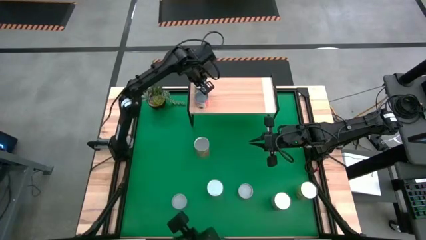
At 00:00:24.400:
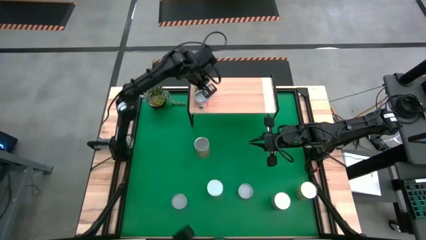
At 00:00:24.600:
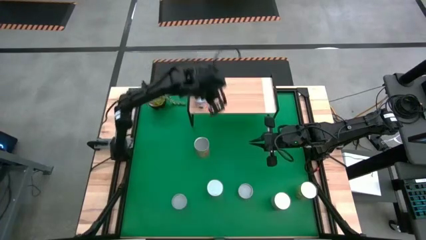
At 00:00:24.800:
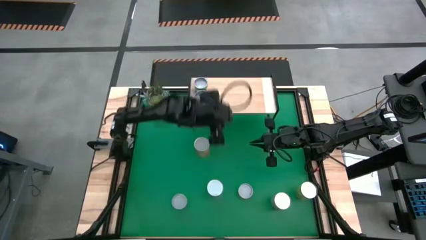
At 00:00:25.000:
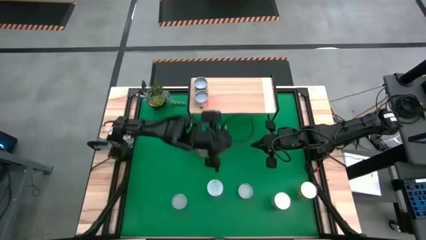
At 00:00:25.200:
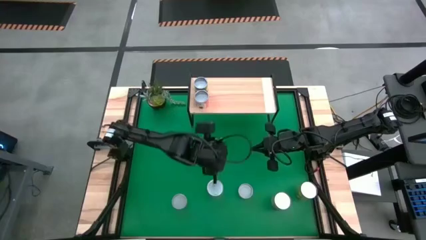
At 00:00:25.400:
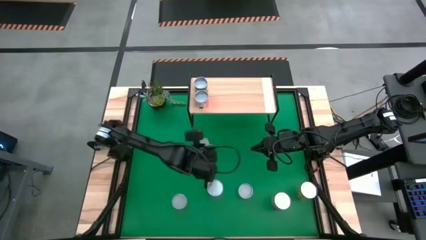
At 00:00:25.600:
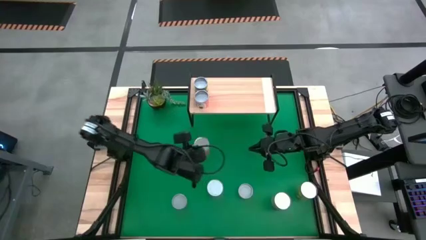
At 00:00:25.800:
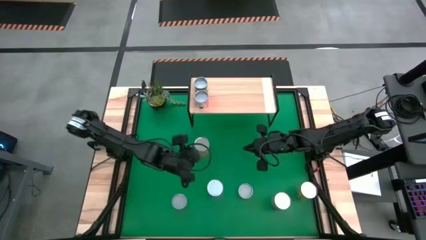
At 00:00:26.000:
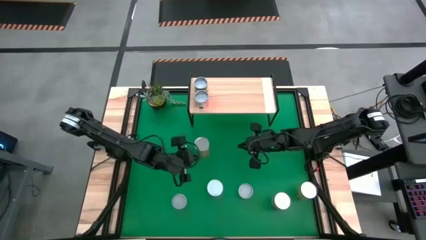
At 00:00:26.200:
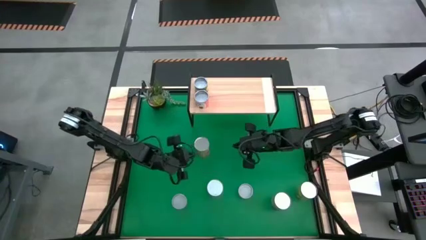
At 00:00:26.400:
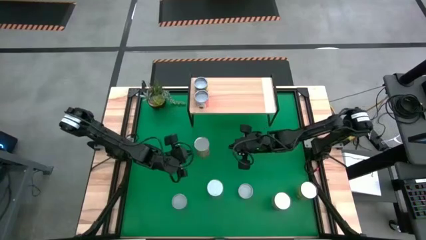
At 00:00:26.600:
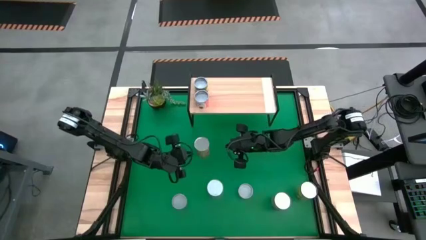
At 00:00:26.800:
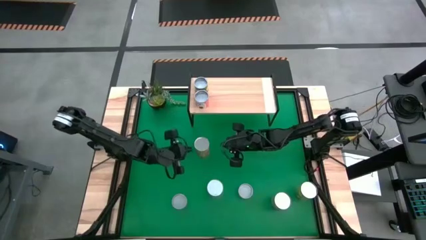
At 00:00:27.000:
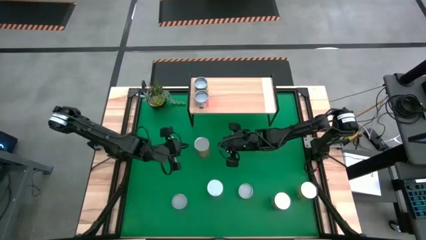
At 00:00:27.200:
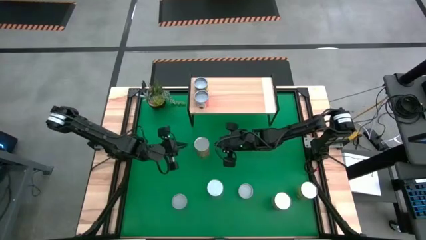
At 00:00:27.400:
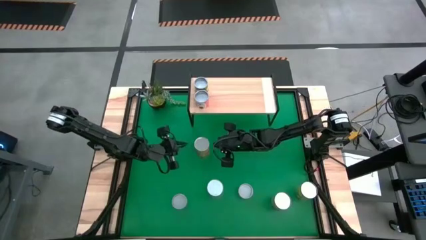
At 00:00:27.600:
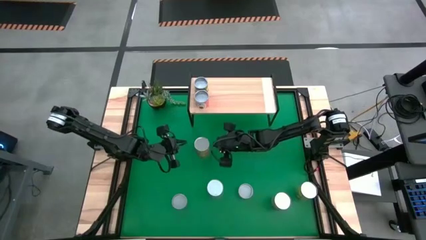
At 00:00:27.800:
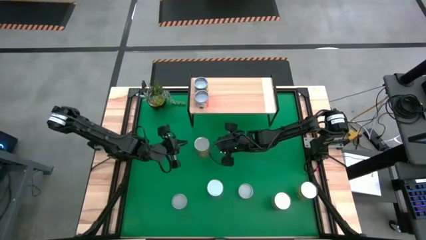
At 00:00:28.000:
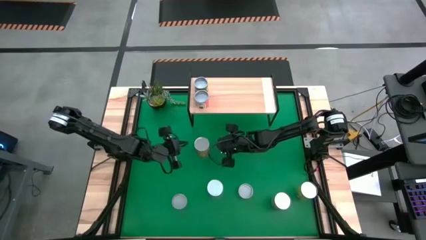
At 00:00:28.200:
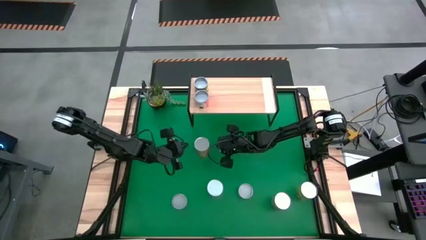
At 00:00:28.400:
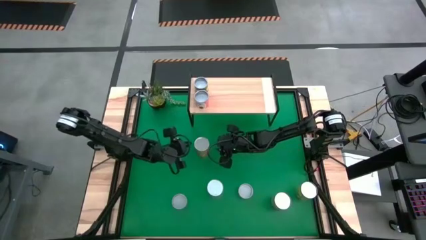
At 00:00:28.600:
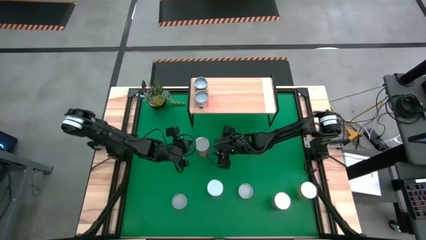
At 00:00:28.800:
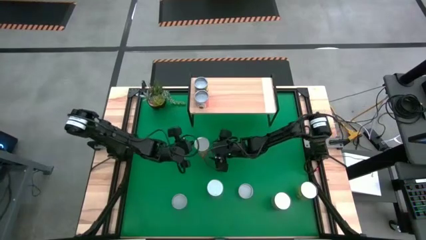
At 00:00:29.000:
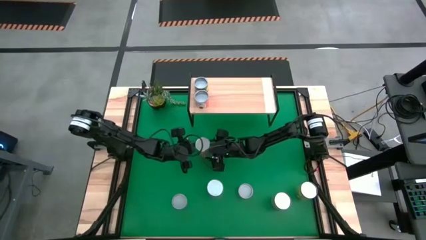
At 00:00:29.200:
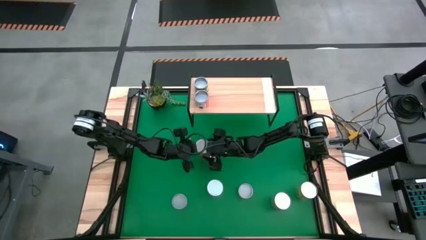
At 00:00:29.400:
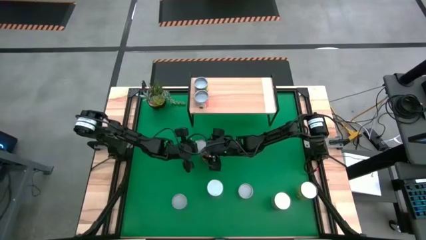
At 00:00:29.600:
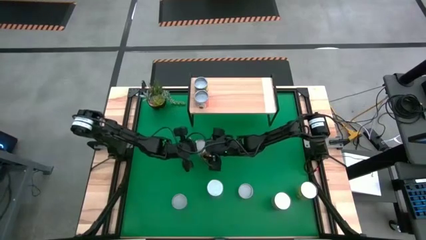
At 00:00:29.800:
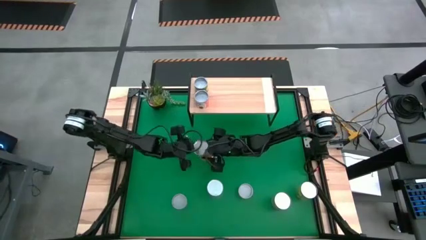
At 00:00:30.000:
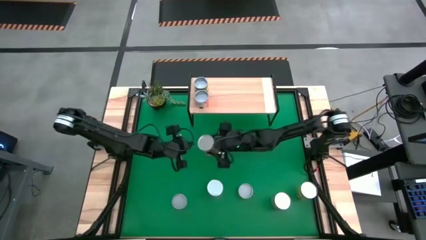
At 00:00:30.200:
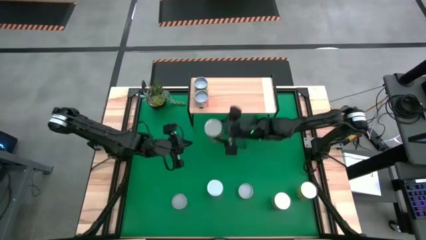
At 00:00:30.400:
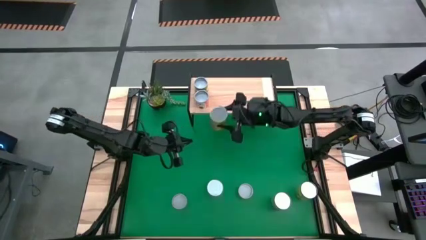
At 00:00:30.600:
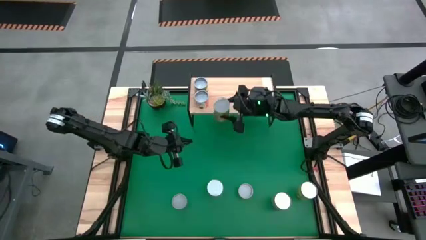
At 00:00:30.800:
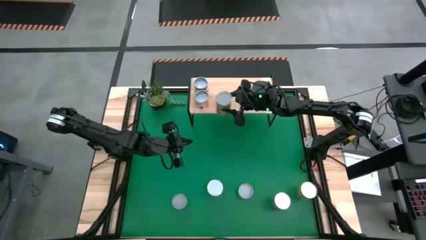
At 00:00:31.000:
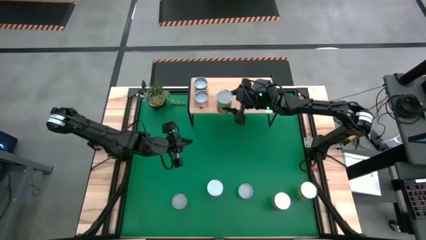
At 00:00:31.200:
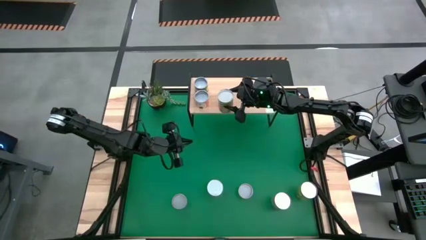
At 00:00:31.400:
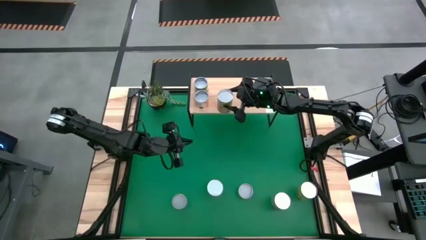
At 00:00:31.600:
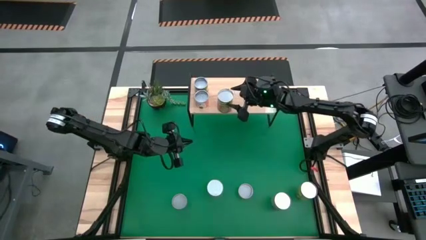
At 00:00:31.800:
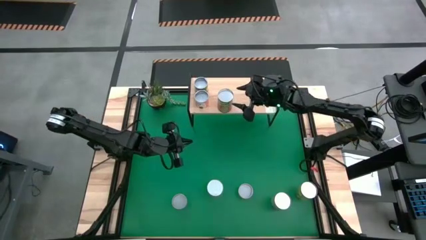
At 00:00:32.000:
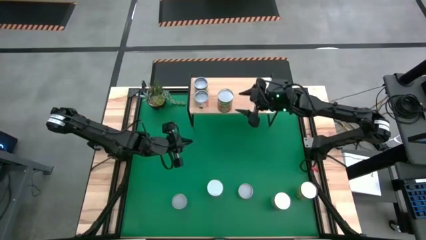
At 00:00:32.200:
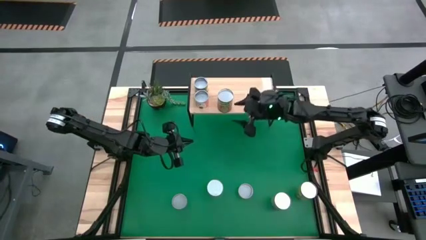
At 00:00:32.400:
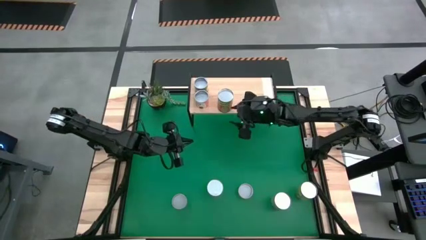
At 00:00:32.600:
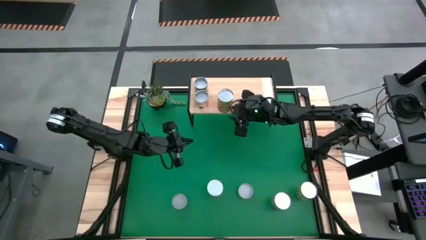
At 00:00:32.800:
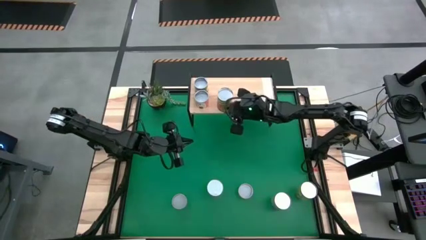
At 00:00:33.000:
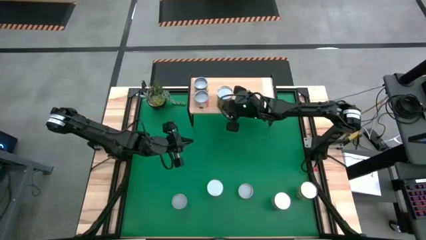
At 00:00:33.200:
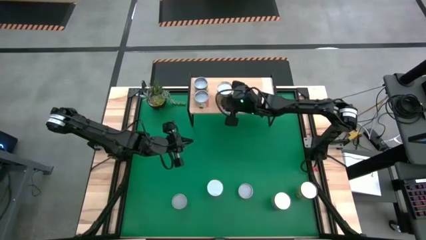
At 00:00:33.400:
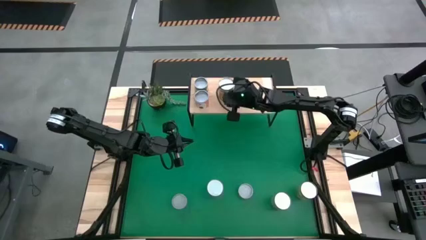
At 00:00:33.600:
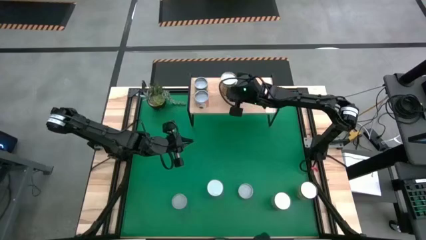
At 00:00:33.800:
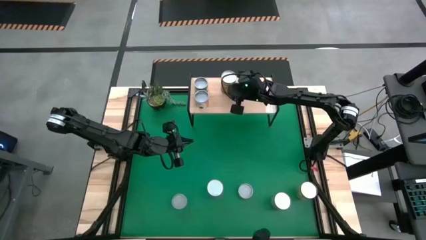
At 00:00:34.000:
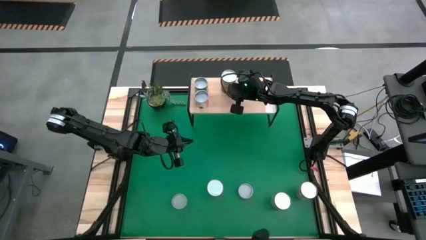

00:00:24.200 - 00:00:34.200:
Task: Pick and place cans onto a shelf
Put the canned pineapple on the shelf

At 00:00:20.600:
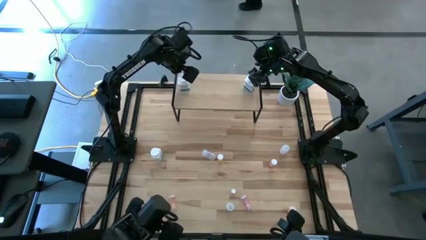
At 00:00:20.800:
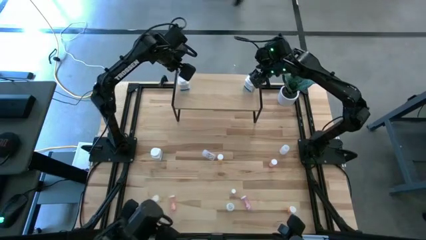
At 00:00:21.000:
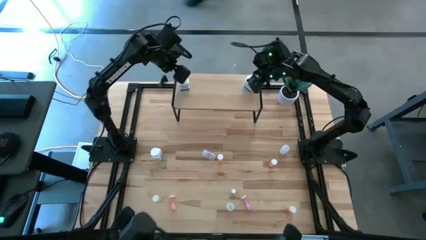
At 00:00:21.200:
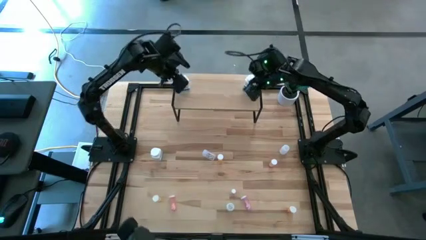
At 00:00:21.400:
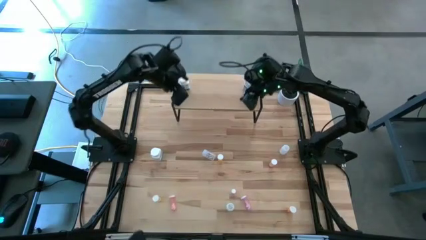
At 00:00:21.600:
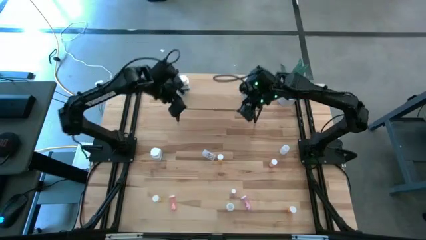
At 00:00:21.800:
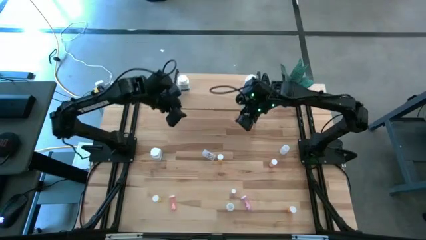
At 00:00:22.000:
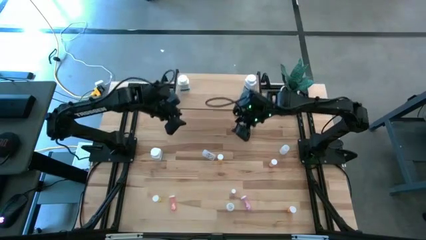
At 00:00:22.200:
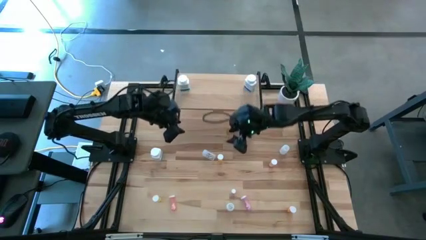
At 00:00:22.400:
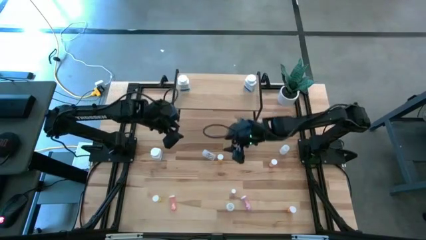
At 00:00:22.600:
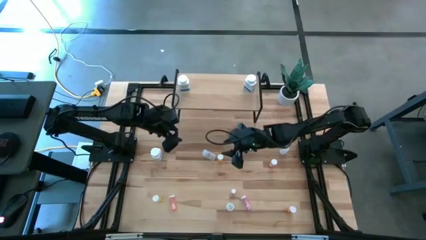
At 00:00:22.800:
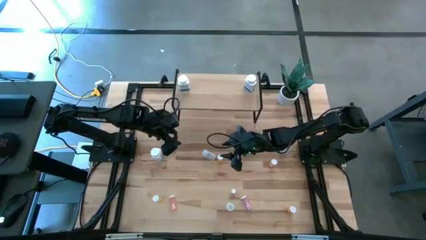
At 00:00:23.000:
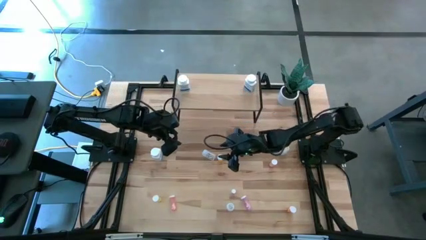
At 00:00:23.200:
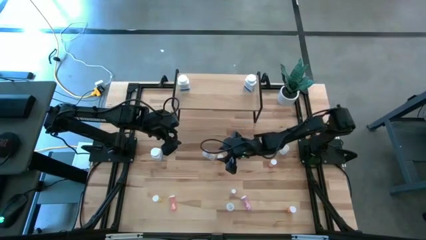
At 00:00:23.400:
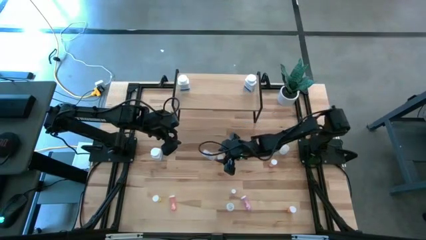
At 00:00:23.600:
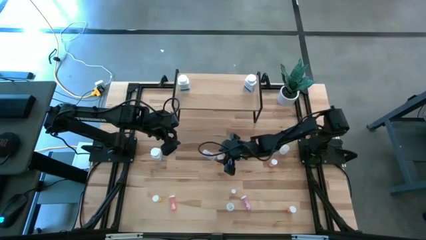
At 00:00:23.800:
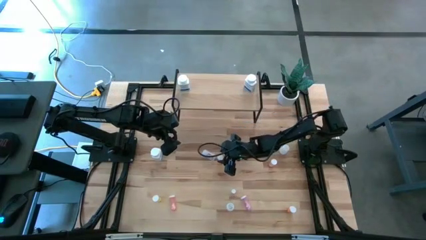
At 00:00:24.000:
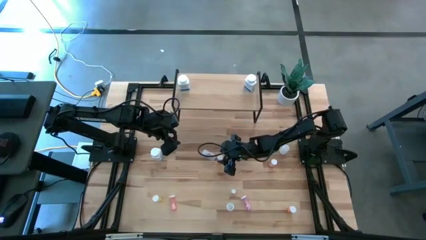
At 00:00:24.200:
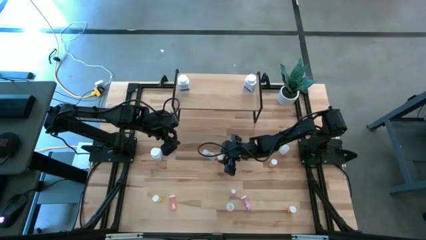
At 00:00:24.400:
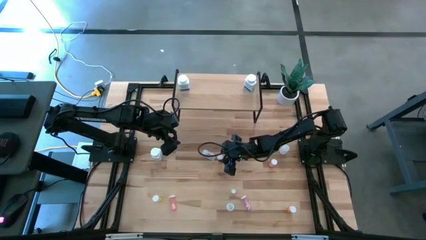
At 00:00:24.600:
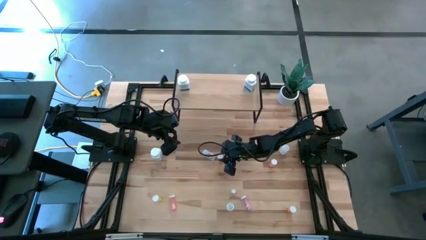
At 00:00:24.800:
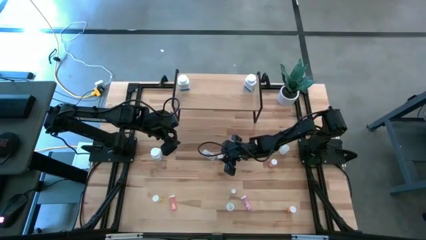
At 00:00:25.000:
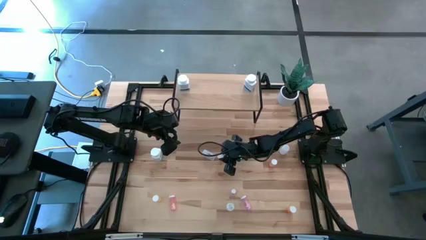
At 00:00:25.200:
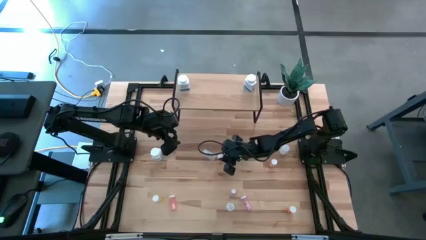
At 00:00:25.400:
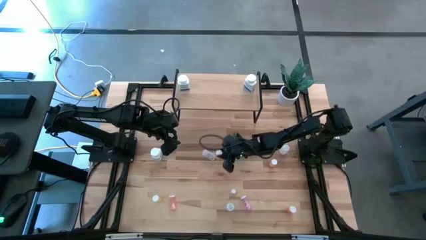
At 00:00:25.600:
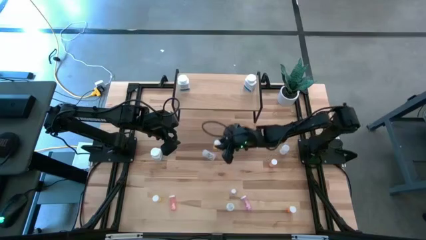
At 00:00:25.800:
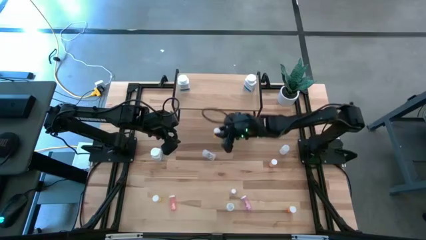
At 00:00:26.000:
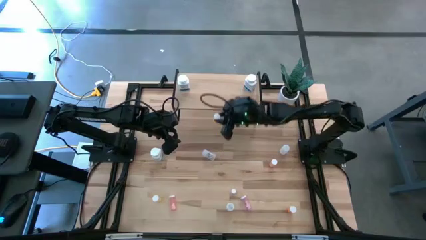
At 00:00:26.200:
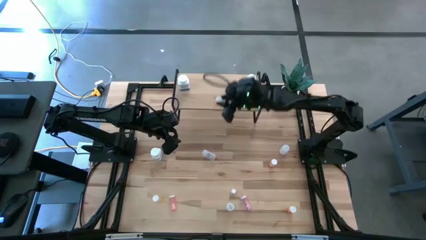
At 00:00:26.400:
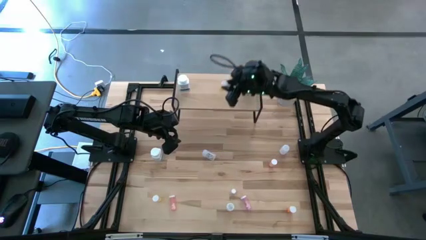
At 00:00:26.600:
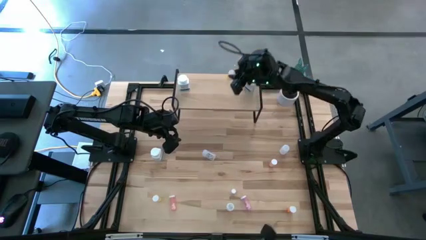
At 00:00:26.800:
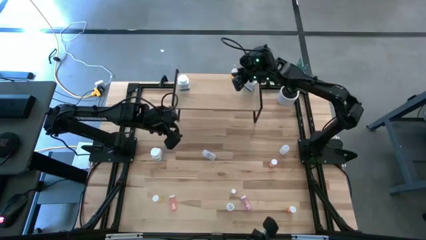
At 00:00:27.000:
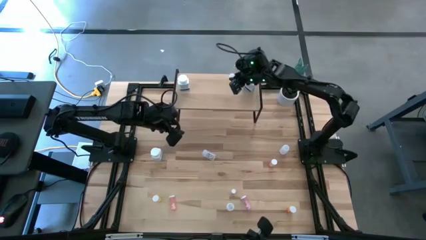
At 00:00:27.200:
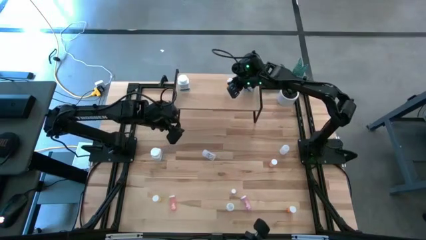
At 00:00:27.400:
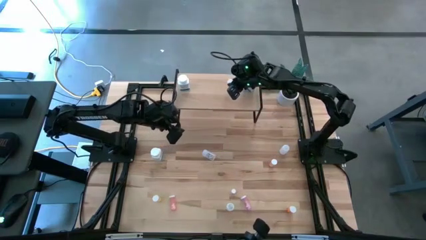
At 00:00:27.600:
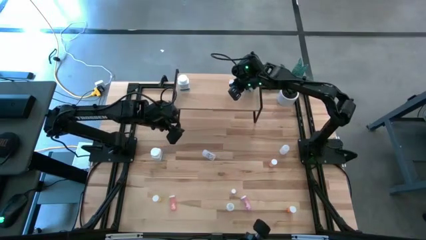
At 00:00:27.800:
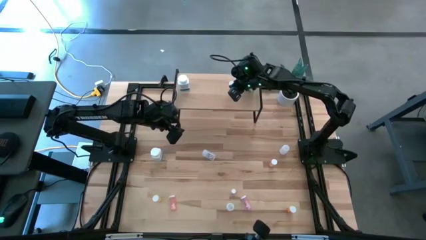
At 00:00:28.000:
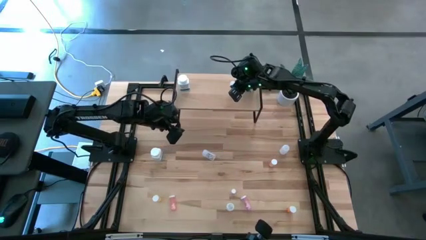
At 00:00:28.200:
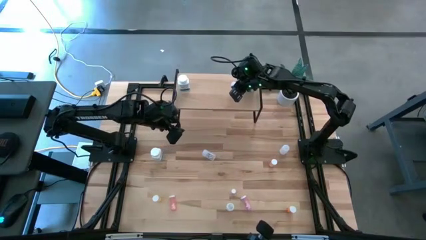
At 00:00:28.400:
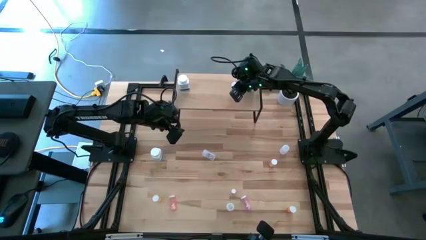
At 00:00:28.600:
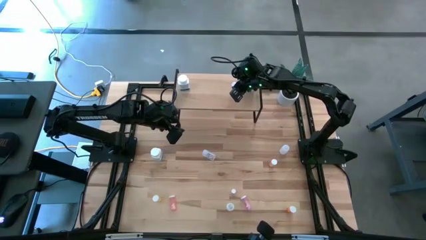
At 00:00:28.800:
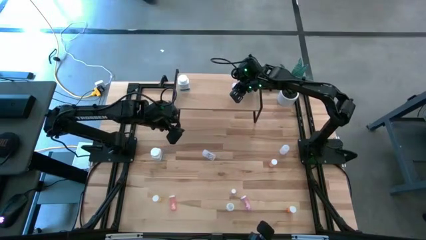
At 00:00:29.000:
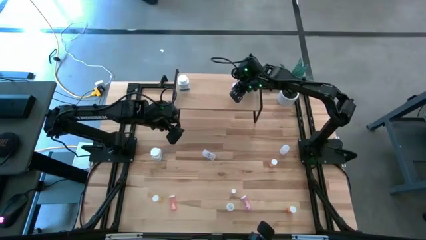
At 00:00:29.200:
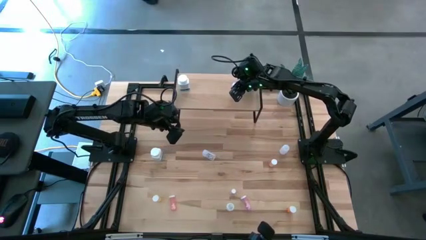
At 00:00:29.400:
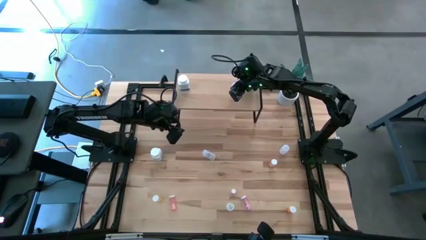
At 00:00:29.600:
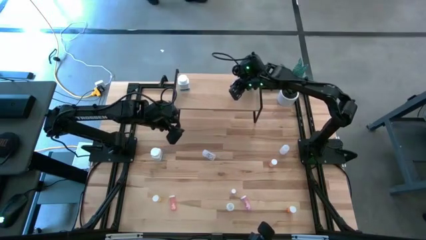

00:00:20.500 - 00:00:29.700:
Task: Pick and place medicine bottles onto shelf by color
Put the top orange pill bottle on the shelf
